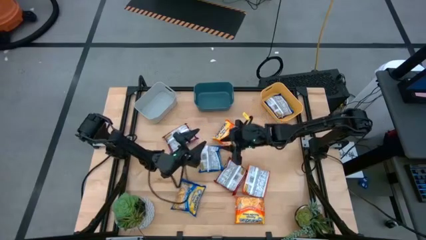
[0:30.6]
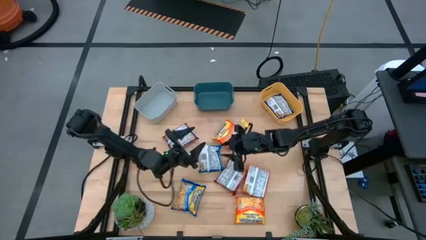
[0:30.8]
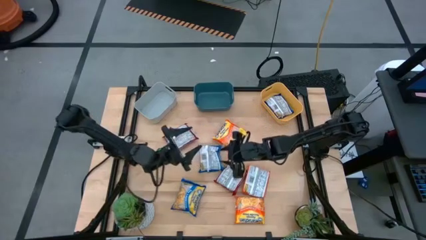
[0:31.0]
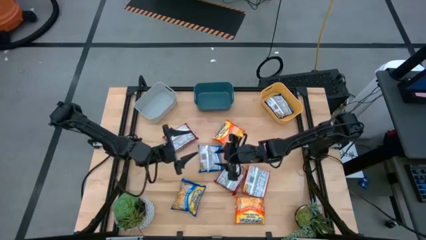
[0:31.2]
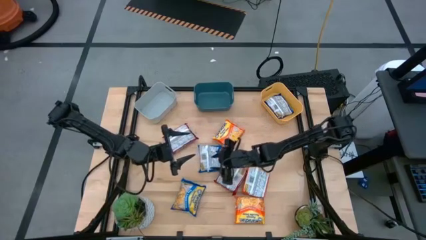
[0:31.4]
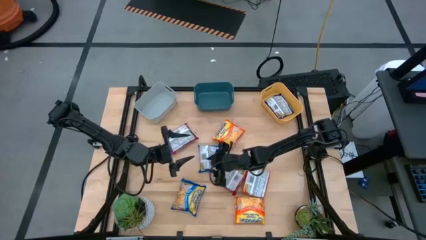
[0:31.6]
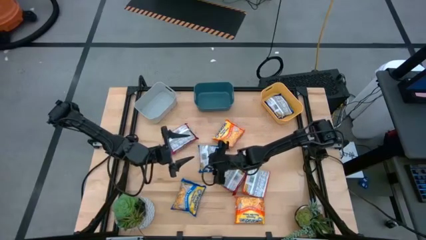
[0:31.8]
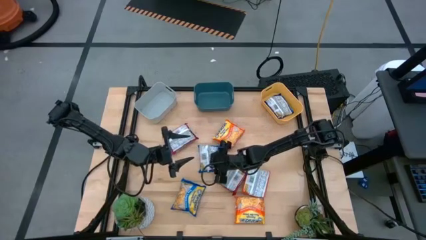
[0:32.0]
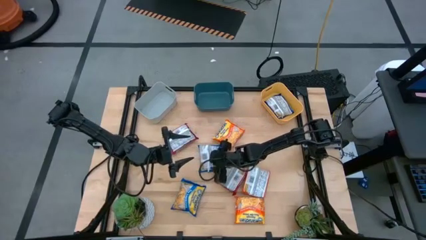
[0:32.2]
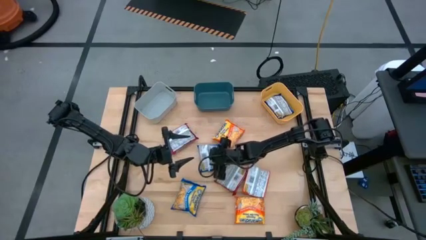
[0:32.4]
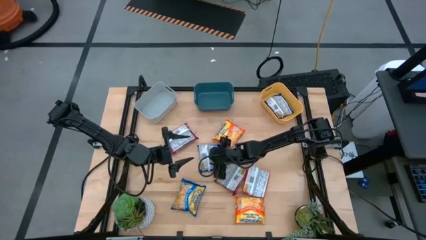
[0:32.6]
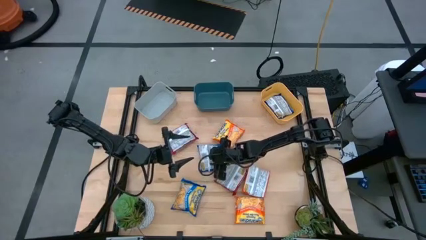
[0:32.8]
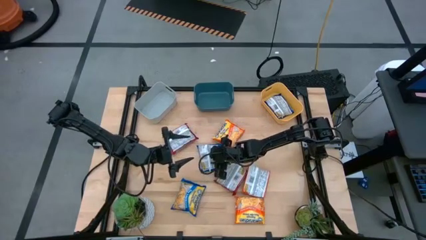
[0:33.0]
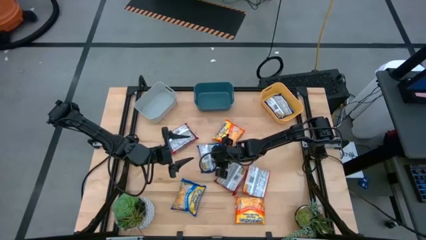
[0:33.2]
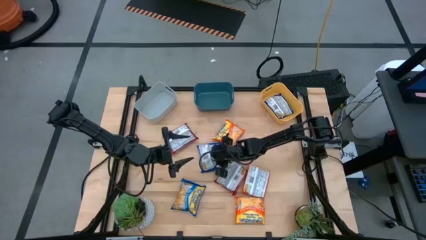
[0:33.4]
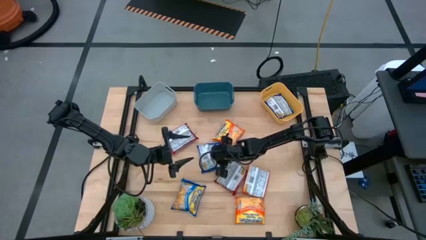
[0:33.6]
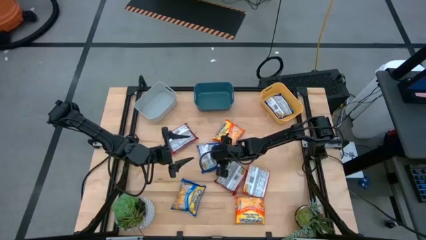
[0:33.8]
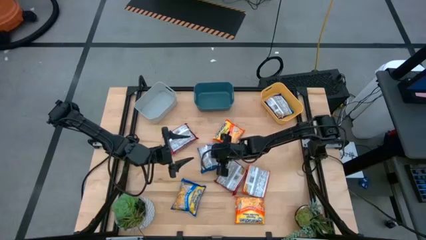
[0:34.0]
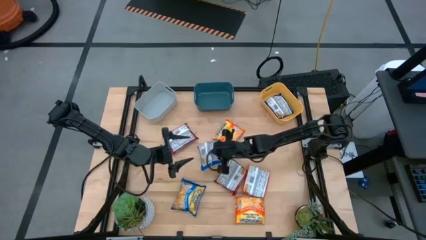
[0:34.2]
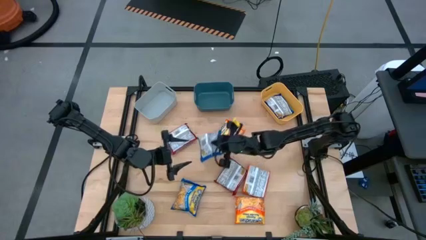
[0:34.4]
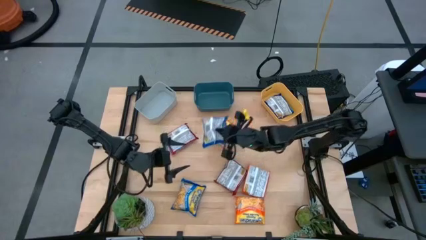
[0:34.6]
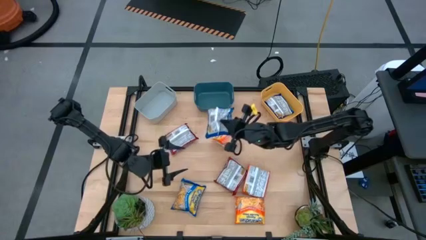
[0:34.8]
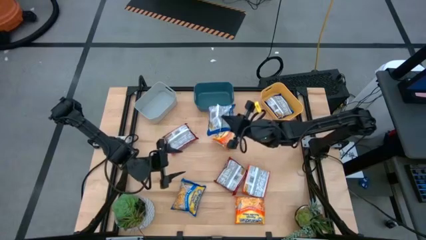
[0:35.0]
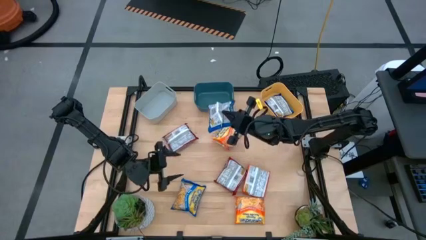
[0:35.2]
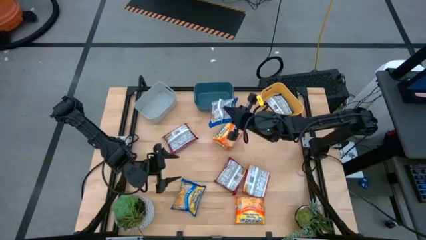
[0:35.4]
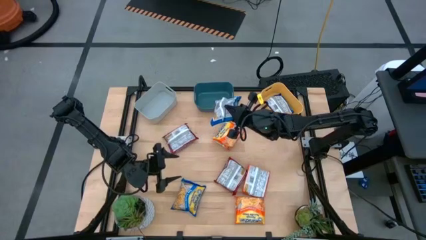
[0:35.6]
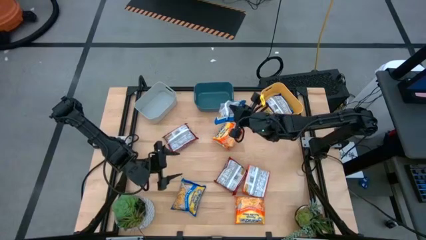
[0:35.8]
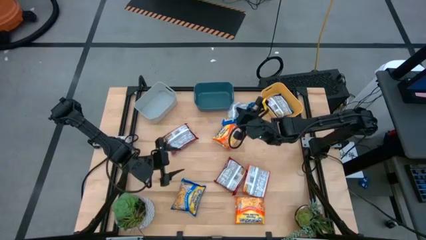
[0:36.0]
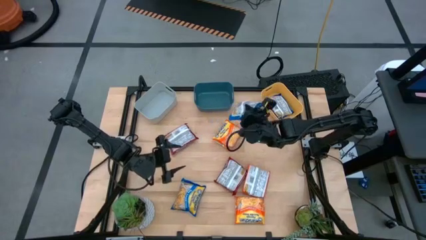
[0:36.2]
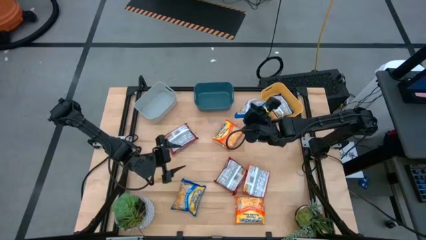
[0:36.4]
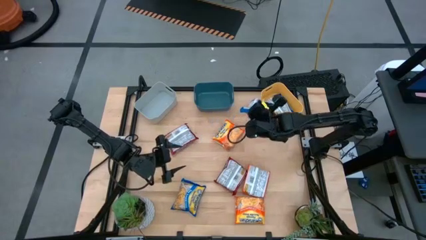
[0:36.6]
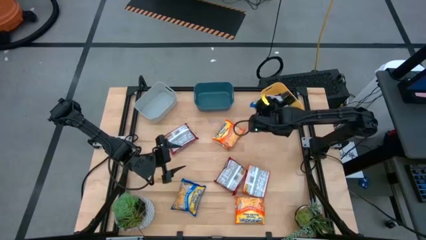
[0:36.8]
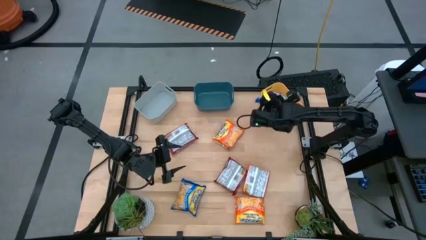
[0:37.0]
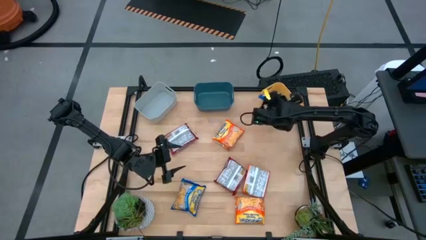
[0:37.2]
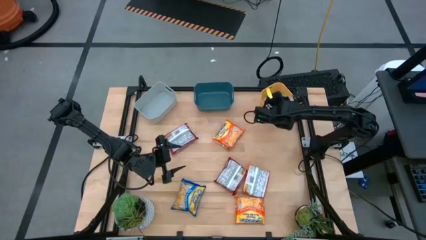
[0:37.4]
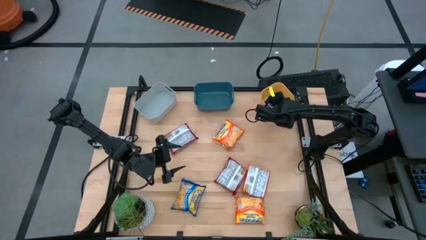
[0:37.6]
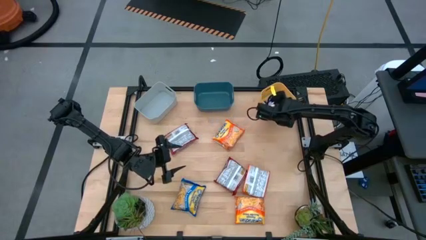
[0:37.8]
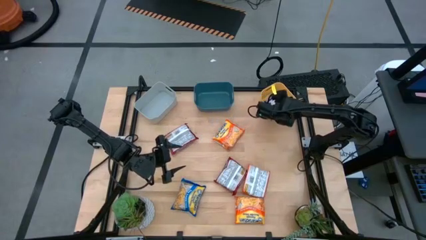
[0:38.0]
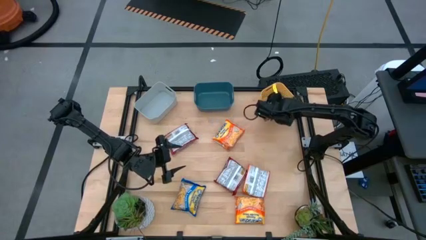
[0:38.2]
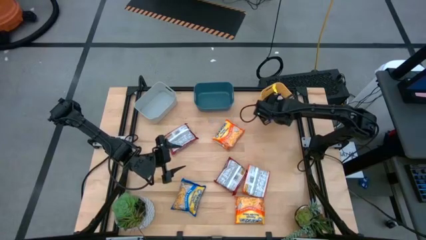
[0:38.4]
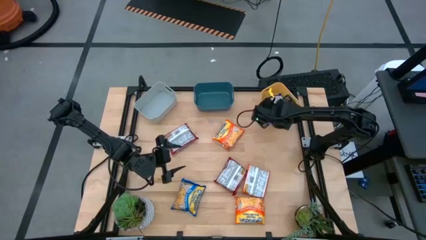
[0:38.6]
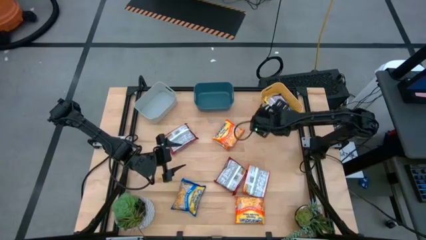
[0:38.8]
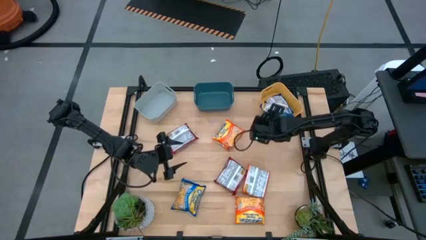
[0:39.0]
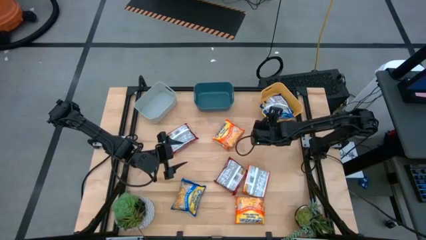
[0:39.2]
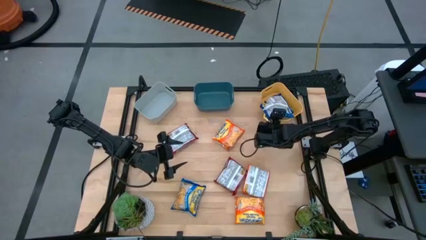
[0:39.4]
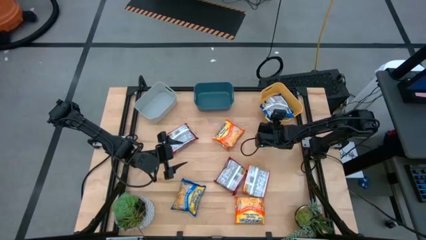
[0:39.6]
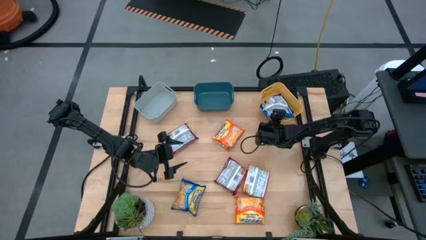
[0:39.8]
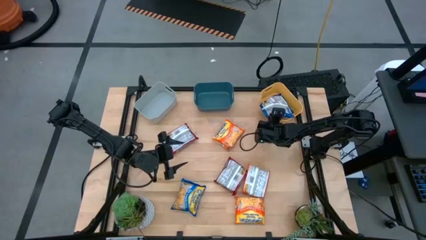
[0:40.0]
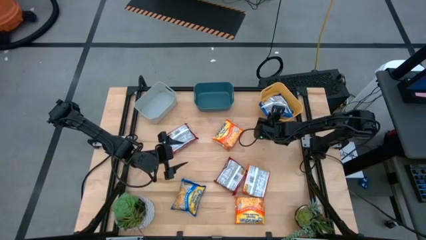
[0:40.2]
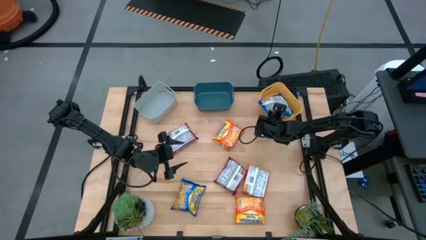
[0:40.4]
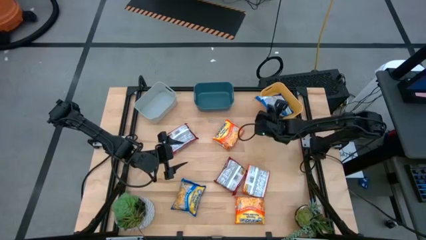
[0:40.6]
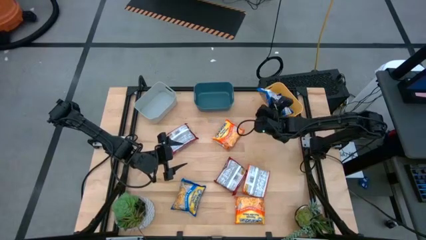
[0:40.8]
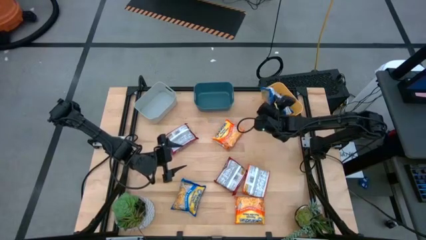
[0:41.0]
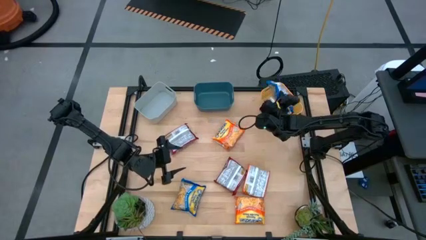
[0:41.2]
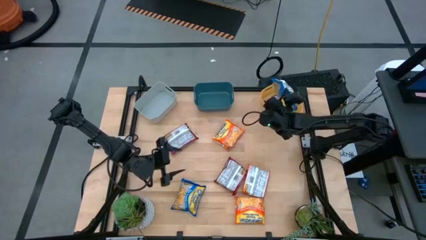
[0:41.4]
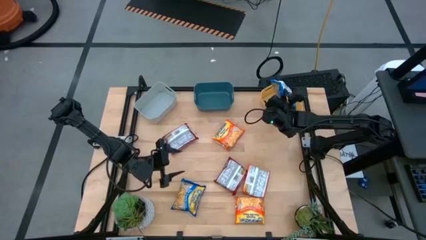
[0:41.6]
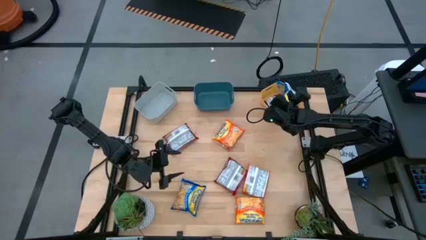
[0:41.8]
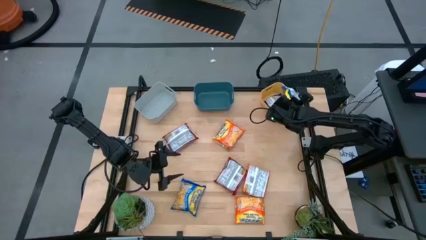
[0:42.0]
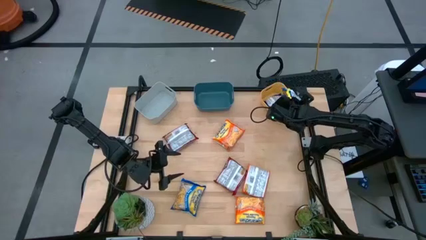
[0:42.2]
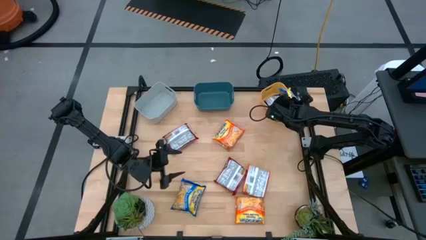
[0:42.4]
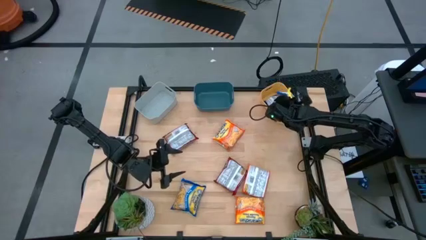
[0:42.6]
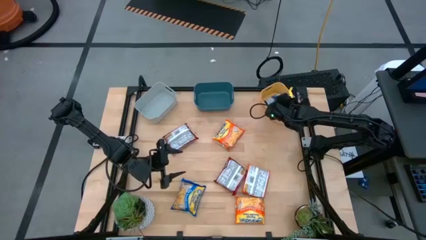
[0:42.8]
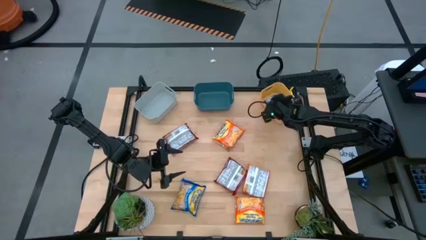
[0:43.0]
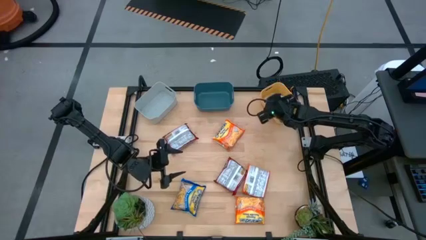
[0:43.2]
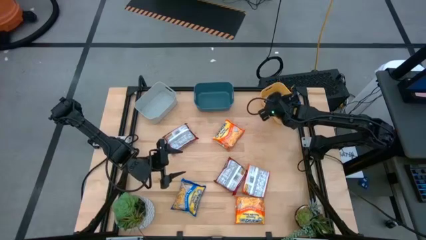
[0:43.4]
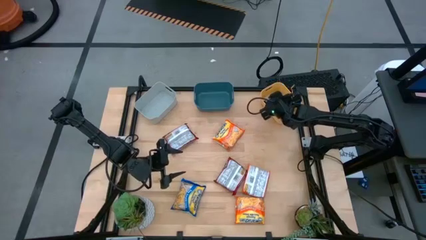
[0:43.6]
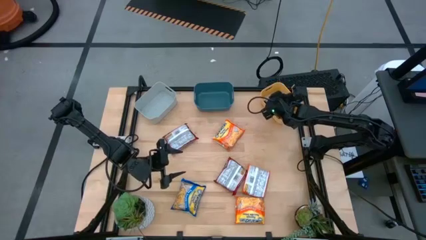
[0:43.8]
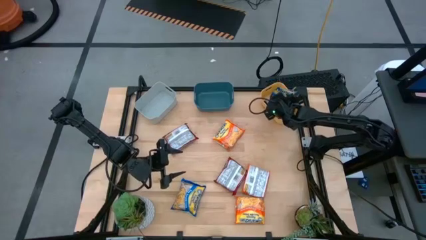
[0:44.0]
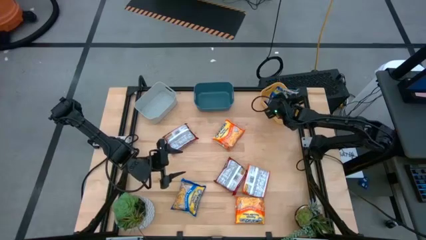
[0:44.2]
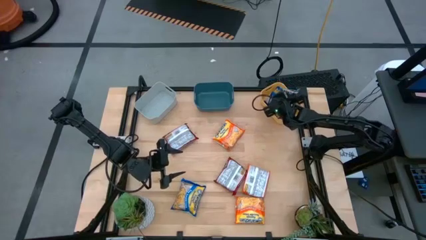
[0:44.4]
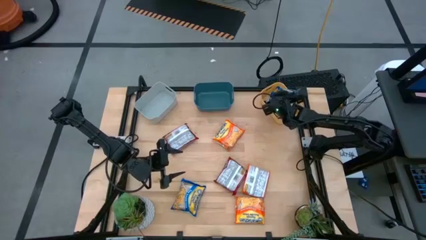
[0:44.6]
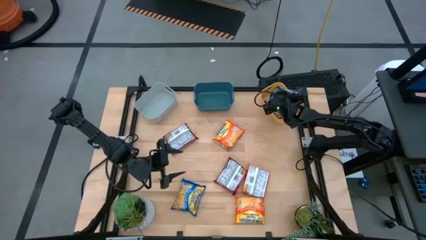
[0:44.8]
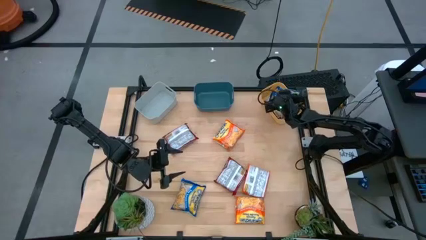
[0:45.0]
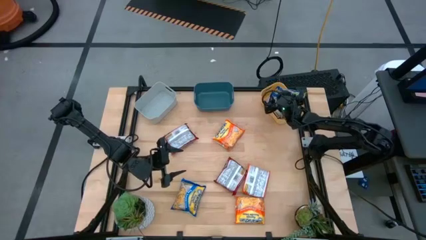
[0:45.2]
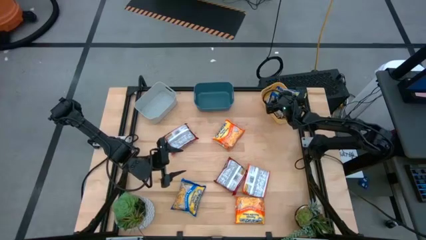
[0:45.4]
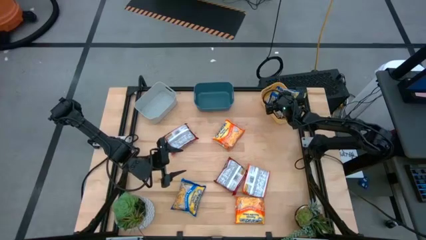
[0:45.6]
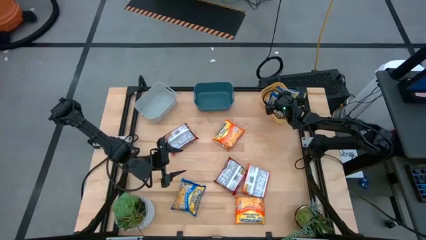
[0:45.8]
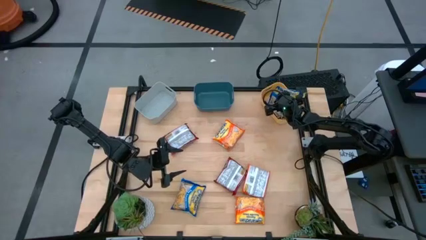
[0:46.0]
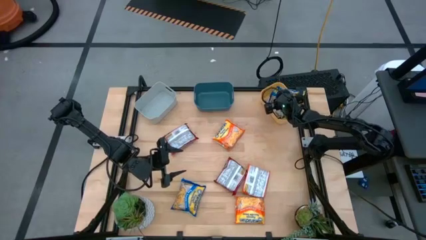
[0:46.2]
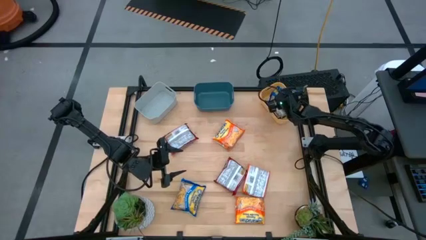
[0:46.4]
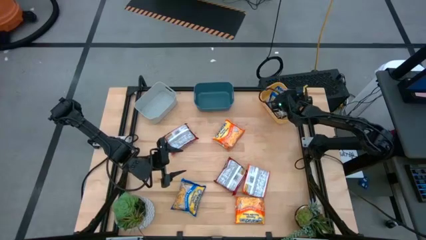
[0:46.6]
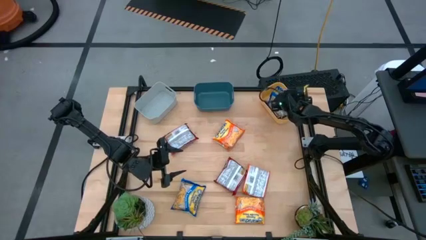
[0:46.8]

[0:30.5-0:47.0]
Task: Sort Maruchan noodles
Put the top blue noodle pack into the yellow bin
